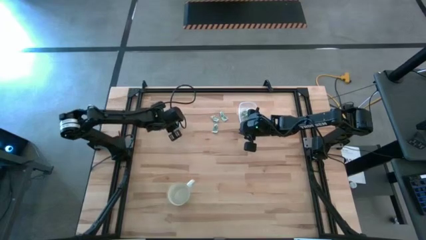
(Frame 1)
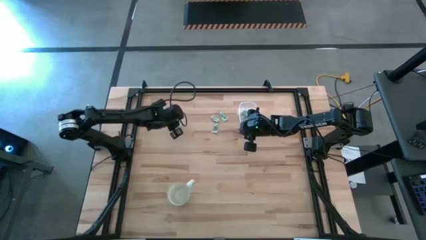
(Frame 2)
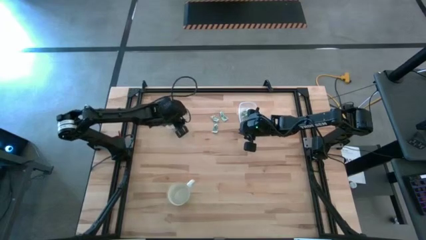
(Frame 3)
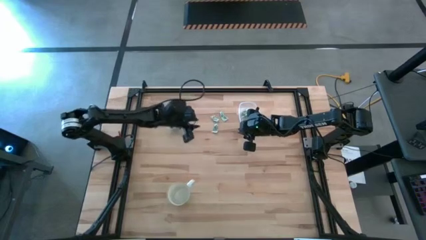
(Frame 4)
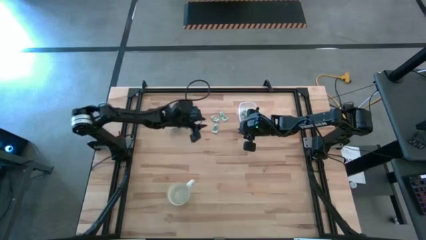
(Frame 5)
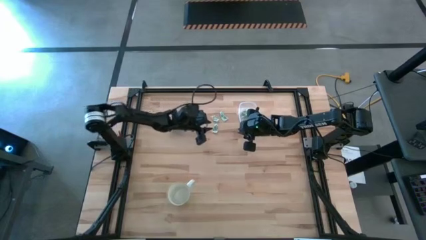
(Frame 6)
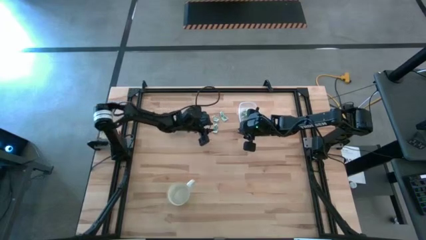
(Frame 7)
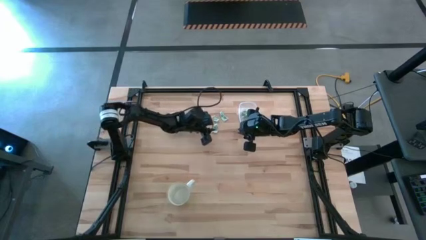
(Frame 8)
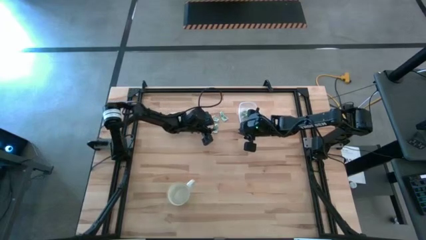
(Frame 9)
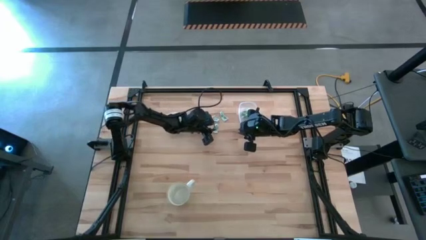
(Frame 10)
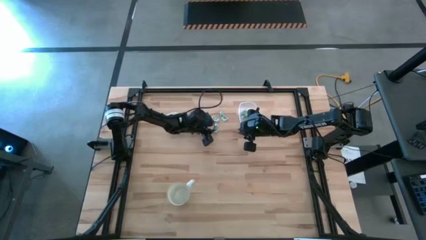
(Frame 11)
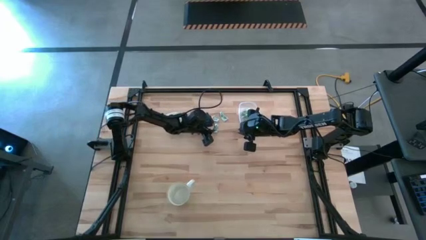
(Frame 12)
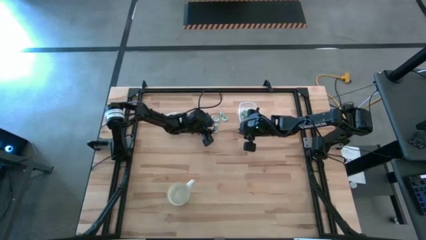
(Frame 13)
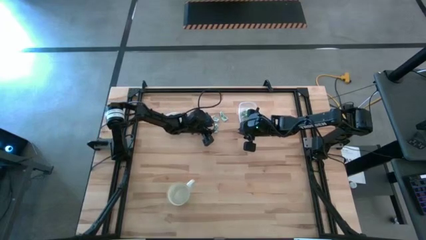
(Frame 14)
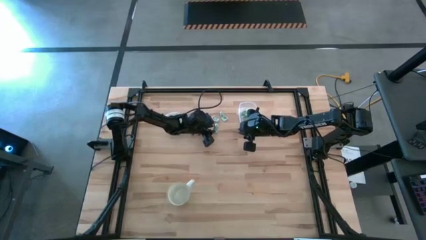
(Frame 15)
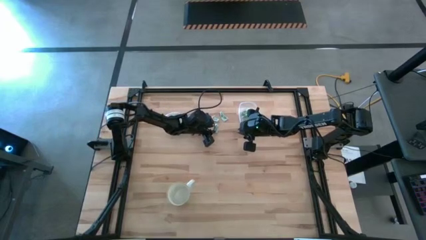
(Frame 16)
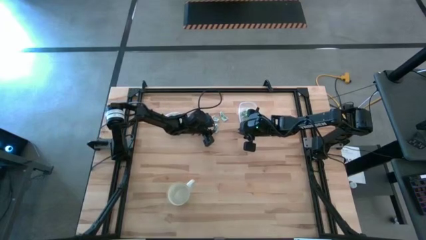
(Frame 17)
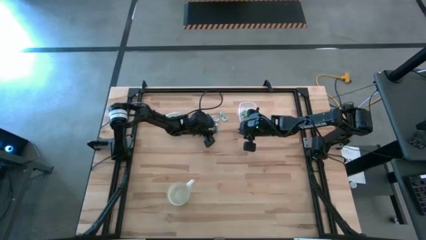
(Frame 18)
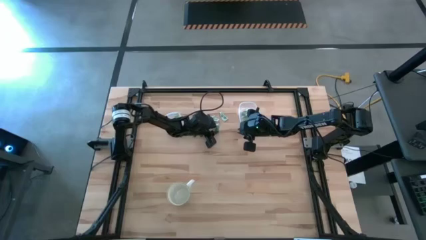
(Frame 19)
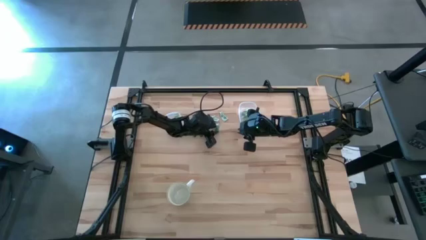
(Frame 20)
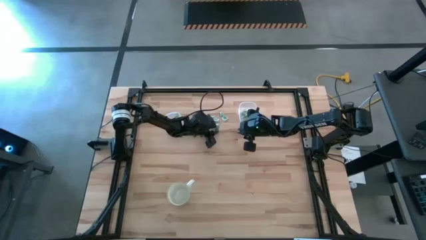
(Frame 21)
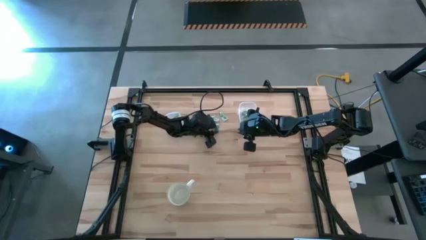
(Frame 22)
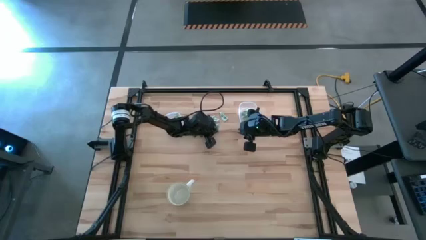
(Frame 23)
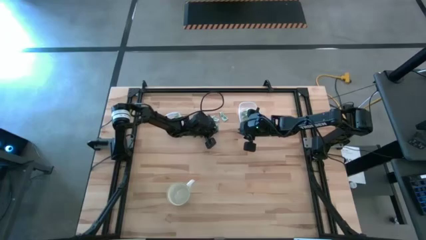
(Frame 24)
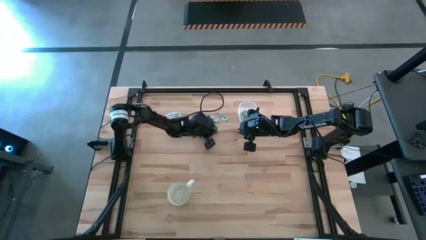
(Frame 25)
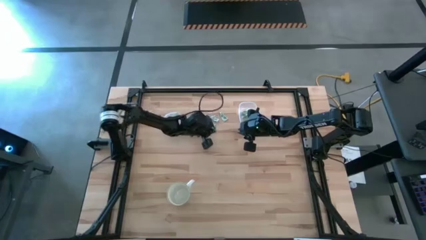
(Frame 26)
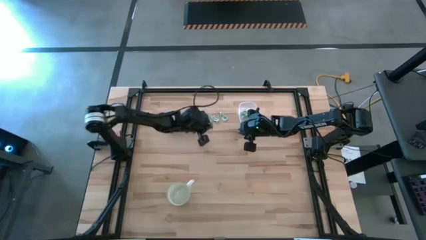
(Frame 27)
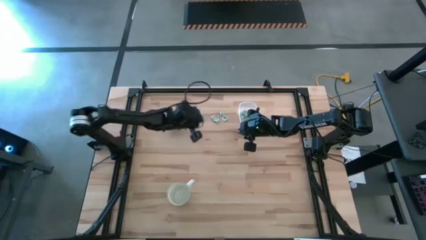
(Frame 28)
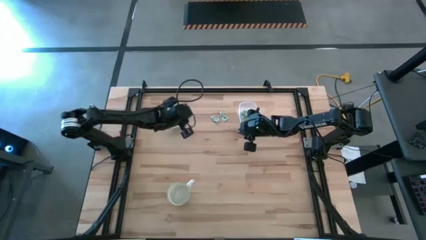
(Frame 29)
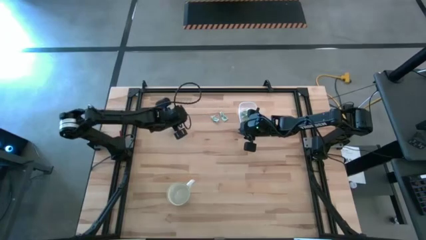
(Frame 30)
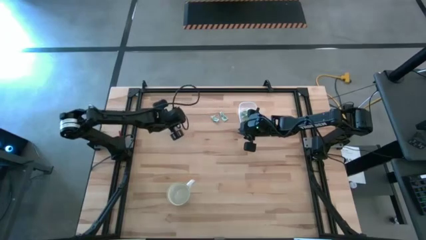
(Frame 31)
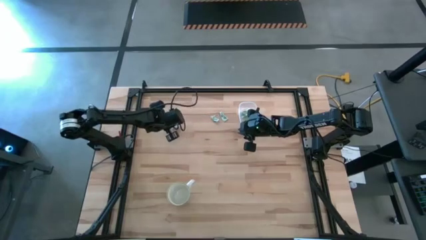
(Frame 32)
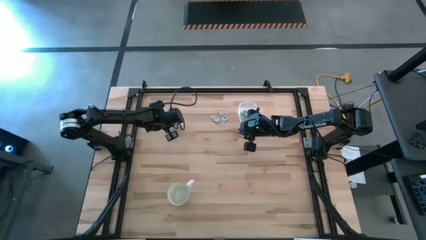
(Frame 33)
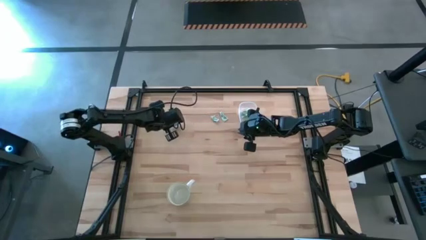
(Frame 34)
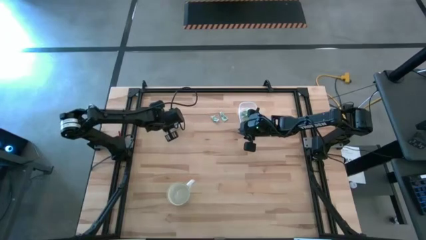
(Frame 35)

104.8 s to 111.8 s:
Task: Pick and place items into bin
Put the green stevia packet into the square transparent bin

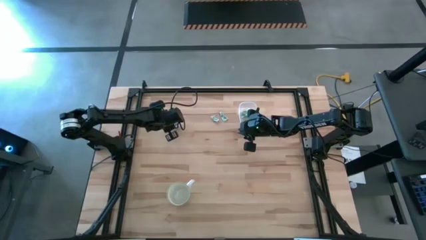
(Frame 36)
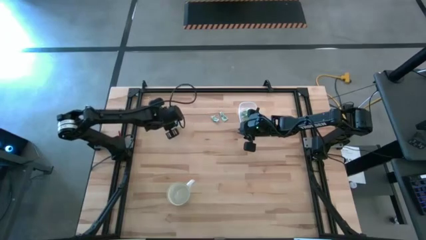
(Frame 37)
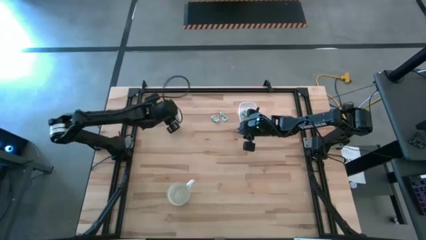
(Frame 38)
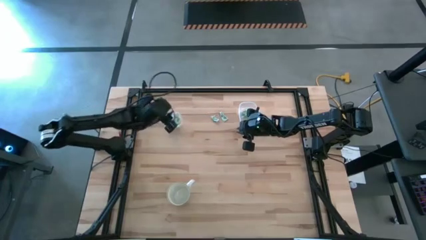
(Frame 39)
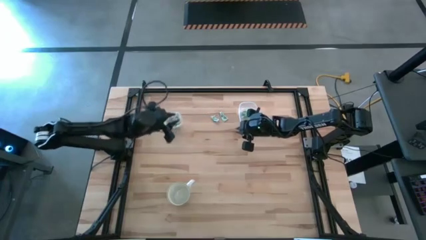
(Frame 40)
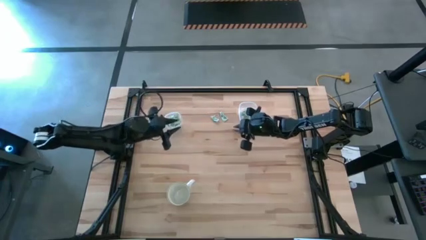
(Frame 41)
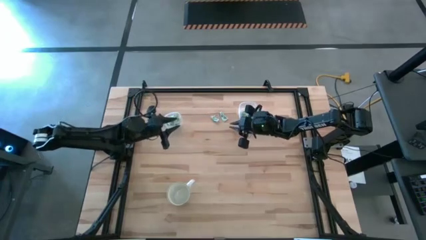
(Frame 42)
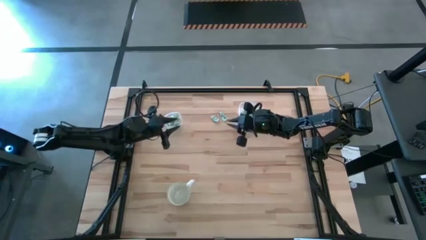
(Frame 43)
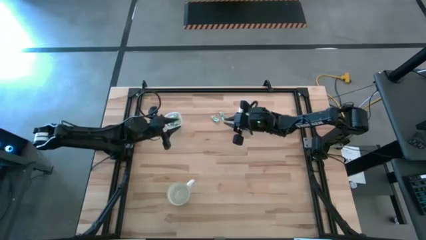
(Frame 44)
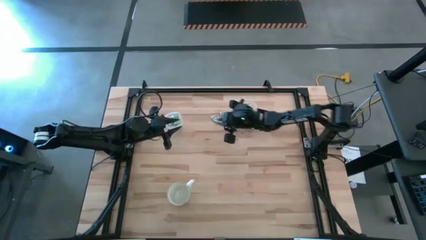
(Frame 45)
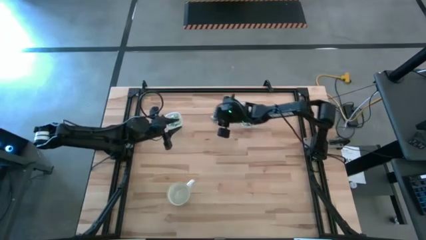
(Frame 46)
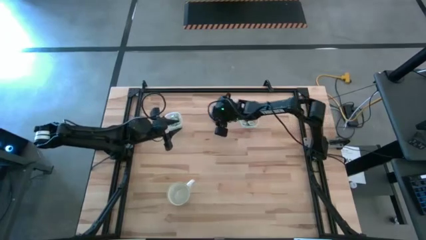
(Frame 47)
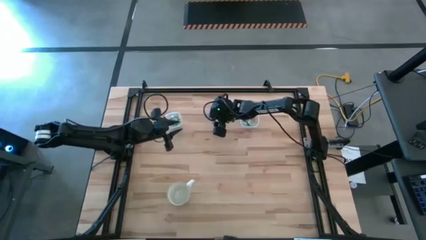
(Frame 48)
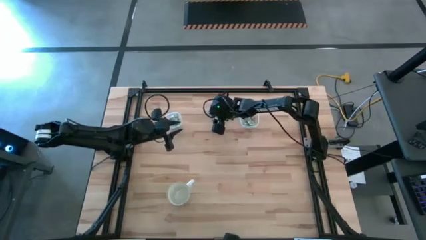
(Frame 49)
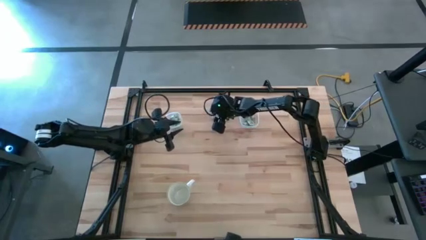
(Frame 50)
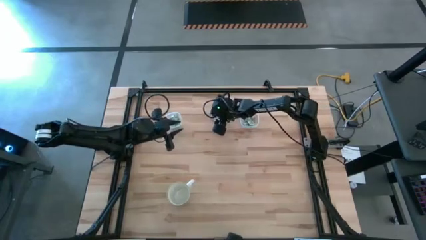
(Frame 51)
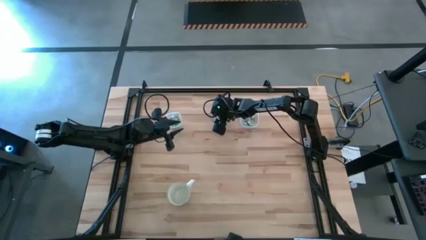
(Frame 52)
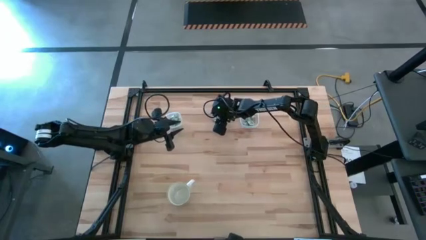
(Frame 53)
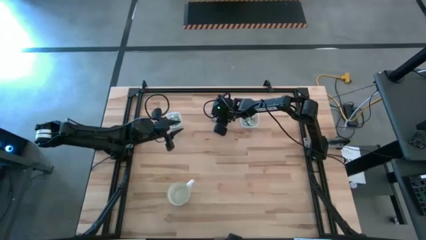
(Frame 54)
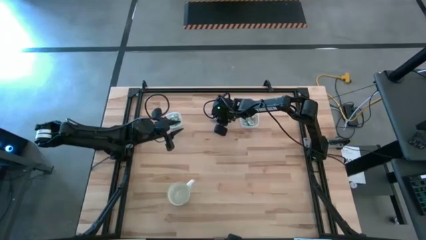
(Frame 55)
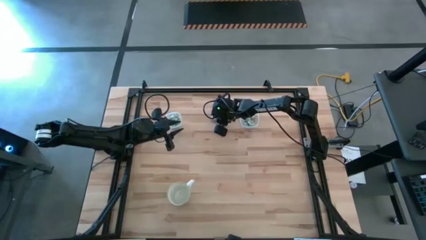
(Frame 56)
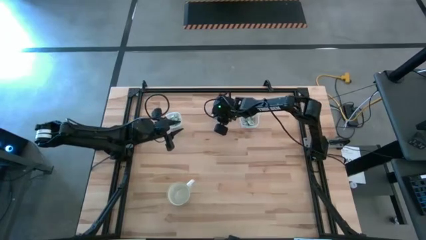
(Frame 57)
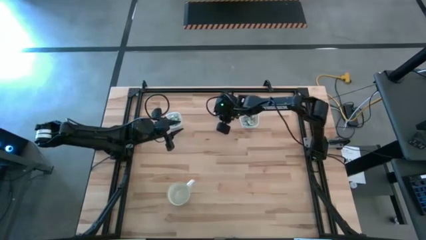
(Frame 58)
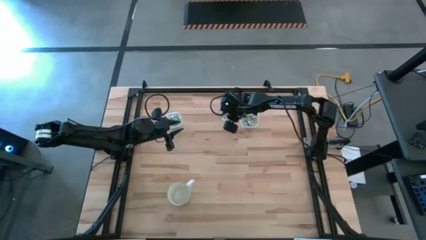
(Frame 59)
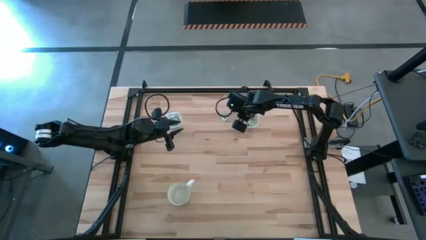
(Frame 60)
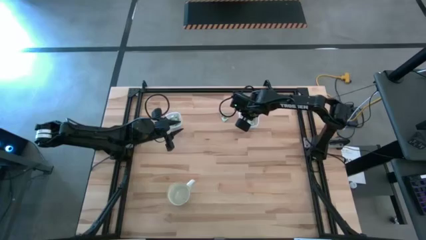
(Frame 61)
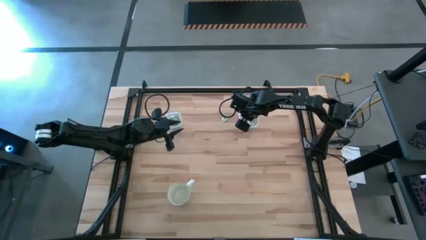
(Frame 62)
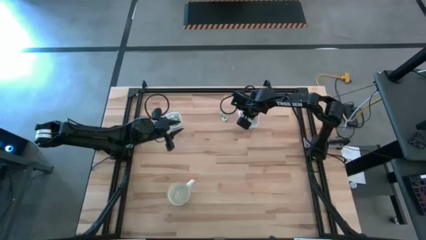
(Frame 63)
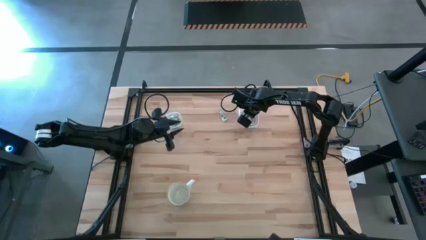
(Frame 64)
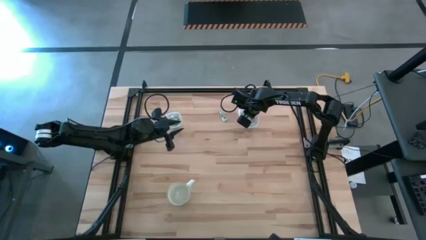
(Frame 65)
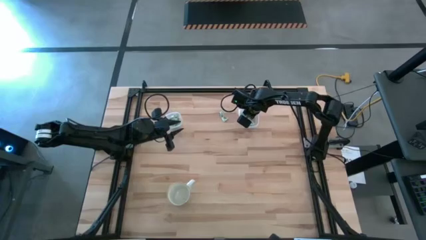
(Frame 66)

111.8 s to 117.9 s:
Put the green stevia packet into the rectangular transparent bin

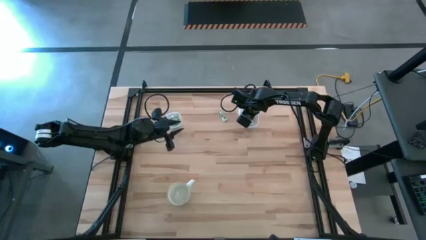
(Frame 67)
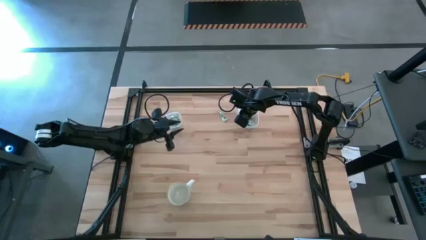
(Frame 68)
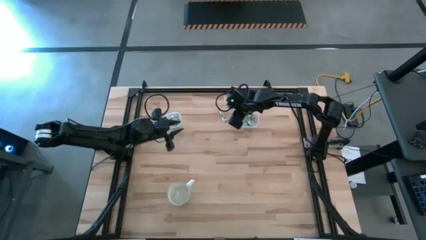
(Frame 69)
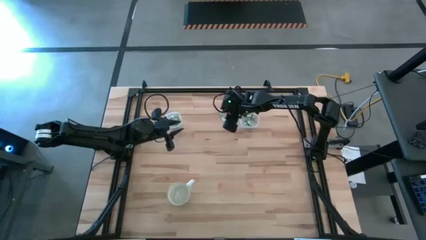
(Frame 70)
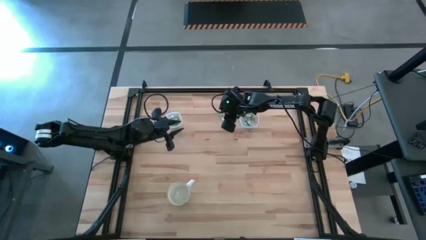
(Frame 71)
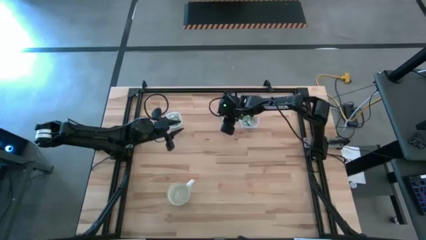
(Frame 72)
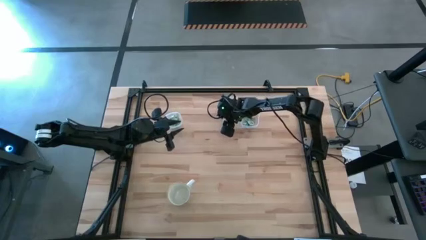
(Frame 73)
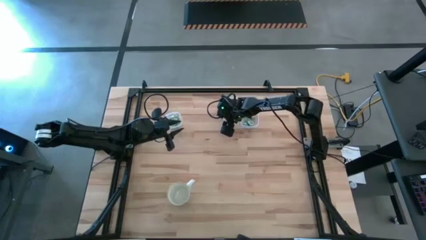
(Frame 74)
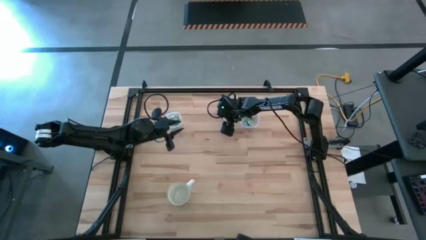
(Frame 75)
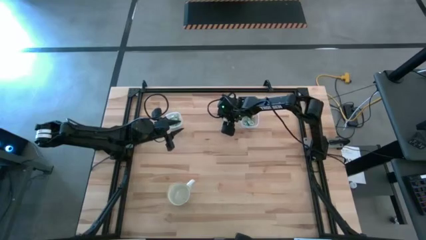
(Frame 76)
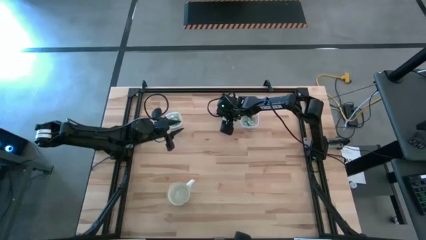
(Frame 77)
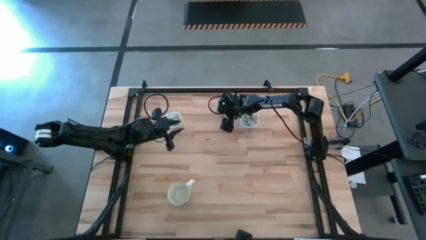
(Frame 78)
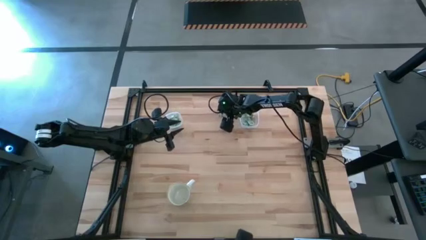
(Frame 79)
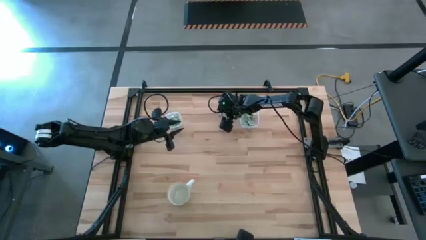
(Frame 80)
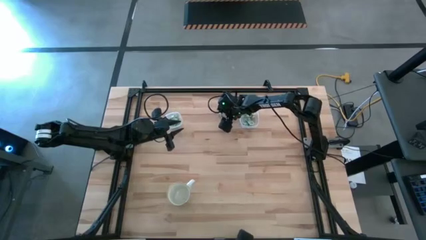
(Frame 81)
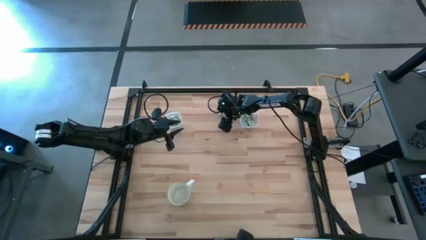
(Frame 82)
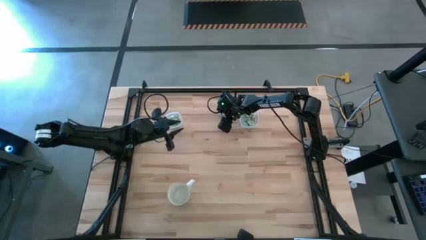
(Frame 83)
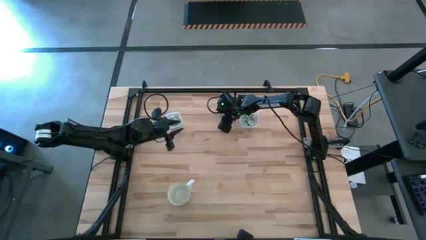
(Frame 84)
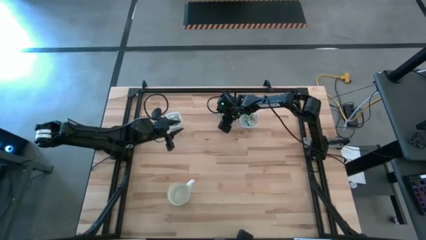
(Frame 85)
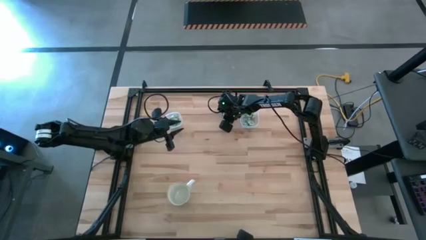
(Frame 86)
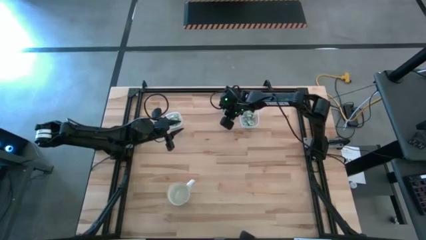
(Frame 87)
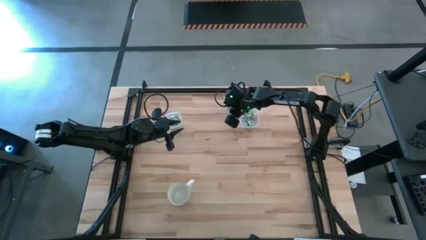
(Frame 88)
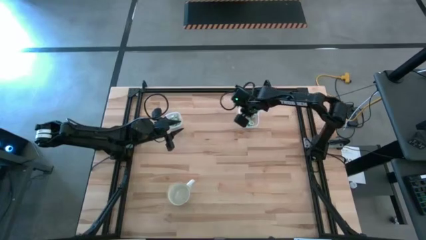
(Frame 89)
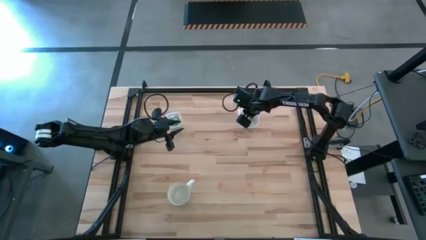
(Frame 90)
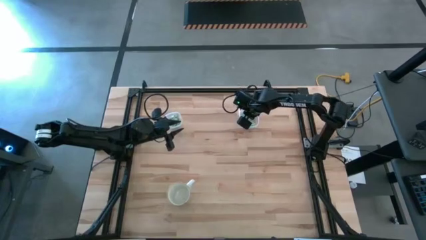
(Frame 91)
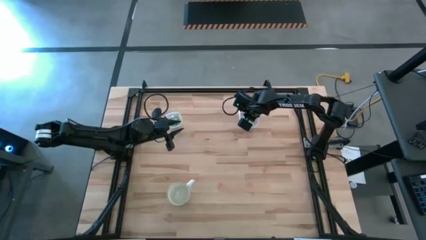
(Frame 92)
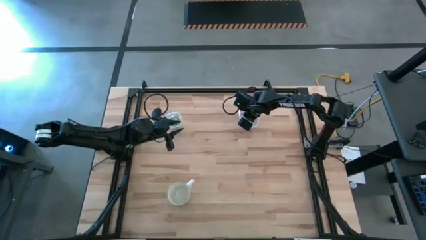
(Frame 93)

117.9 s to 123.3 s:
Put the green stevia packet into the rectangular transparent bin
